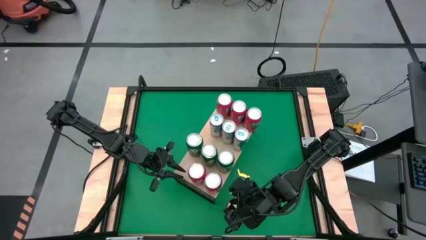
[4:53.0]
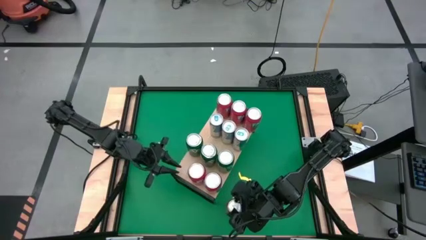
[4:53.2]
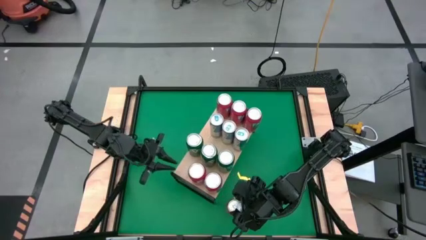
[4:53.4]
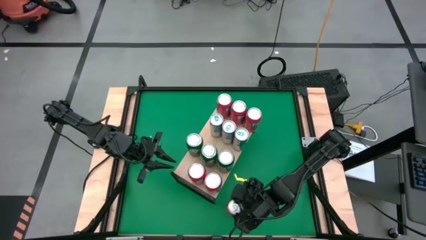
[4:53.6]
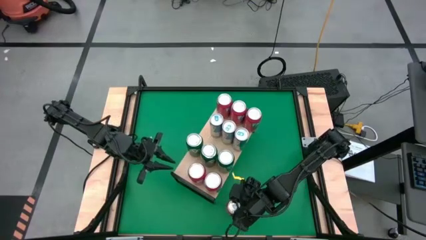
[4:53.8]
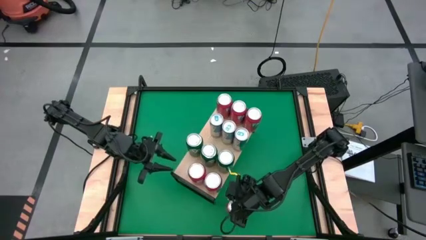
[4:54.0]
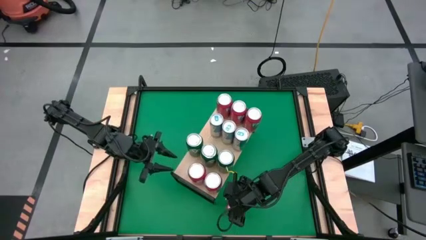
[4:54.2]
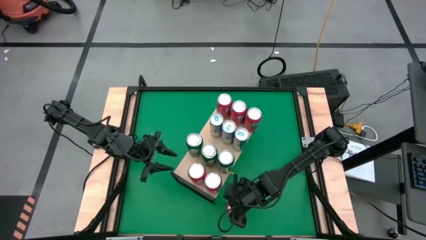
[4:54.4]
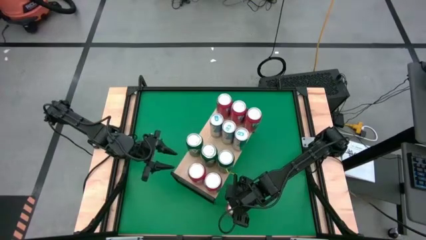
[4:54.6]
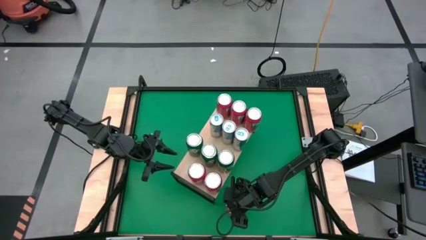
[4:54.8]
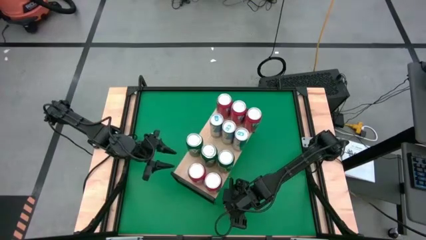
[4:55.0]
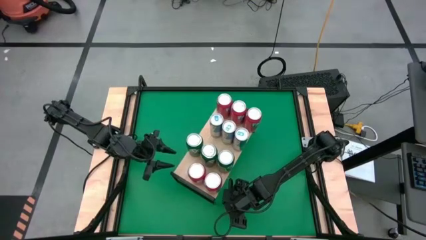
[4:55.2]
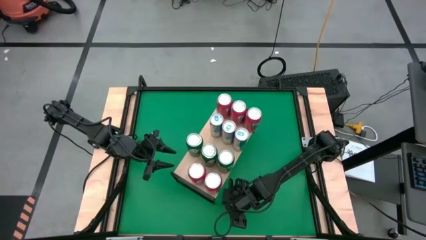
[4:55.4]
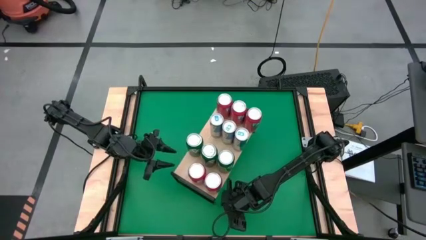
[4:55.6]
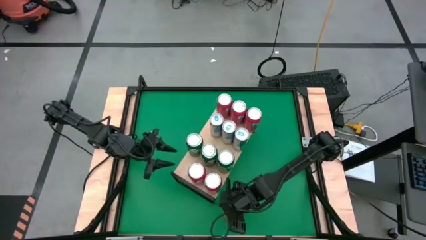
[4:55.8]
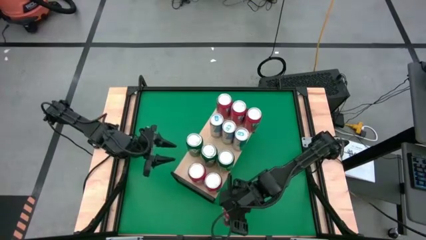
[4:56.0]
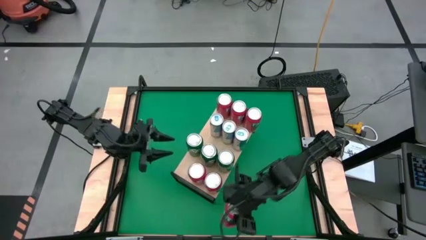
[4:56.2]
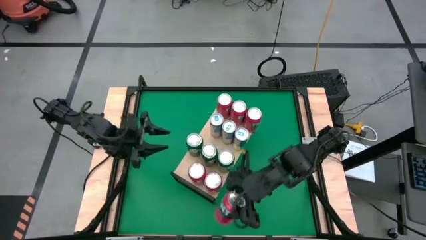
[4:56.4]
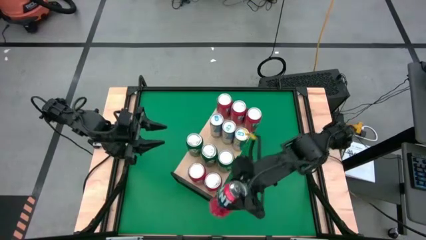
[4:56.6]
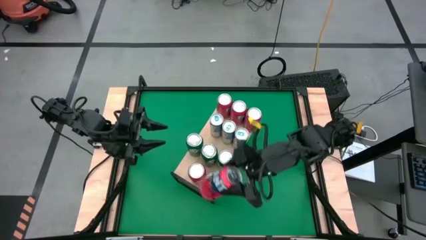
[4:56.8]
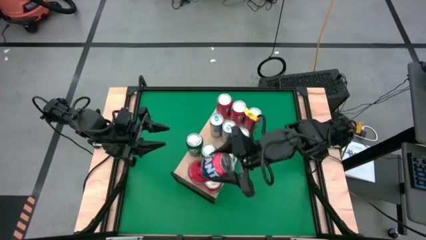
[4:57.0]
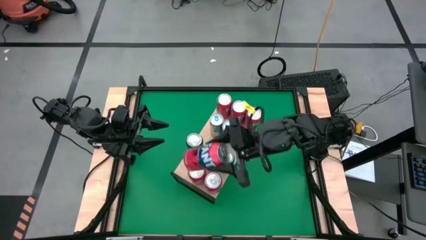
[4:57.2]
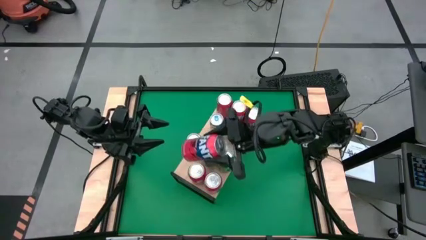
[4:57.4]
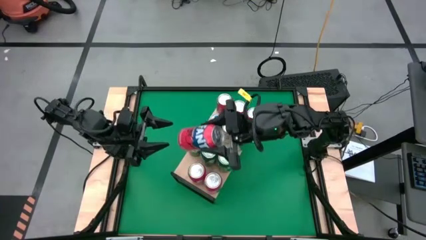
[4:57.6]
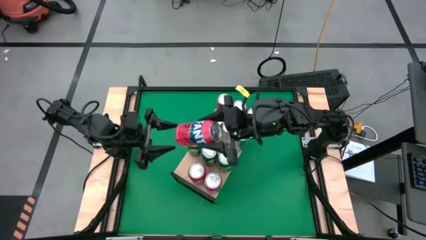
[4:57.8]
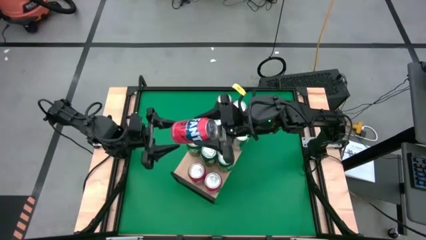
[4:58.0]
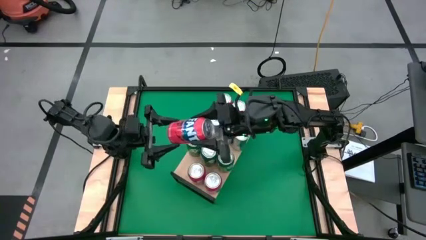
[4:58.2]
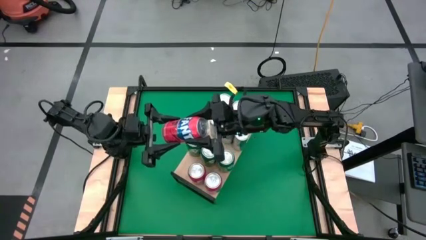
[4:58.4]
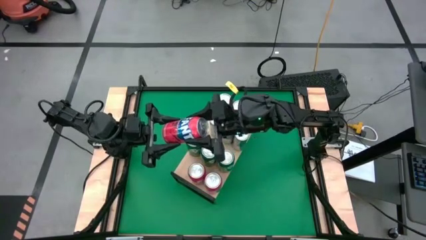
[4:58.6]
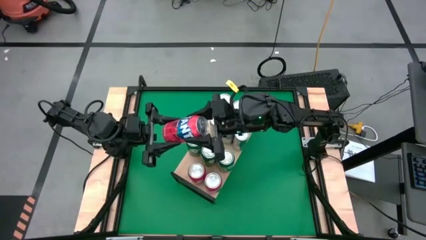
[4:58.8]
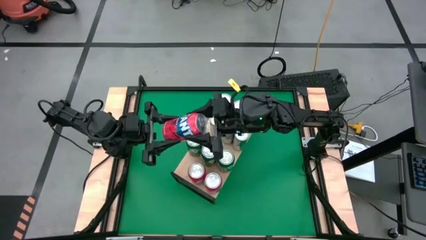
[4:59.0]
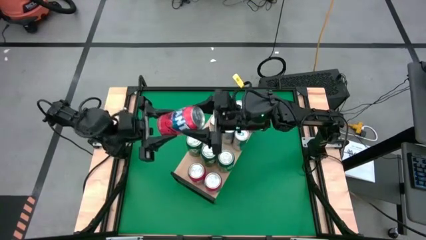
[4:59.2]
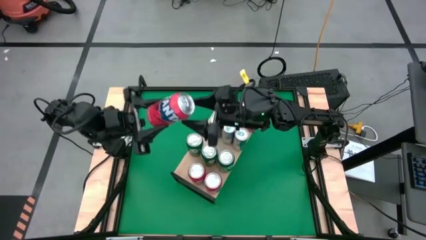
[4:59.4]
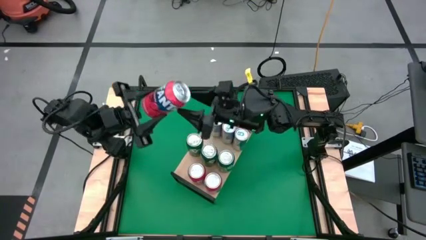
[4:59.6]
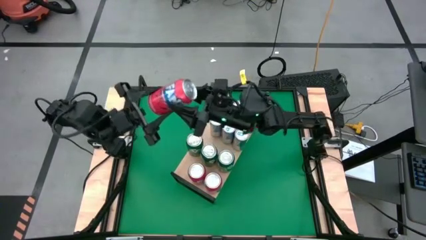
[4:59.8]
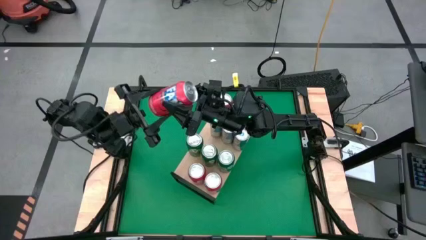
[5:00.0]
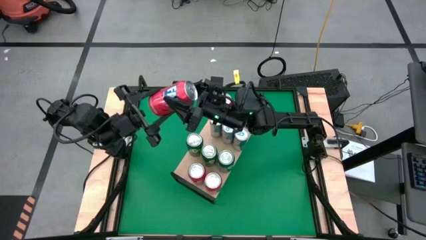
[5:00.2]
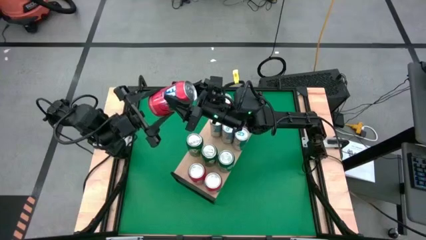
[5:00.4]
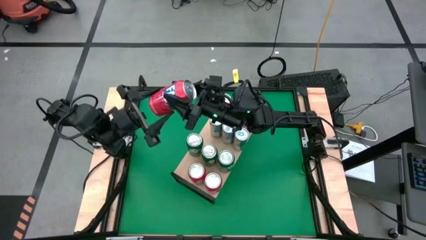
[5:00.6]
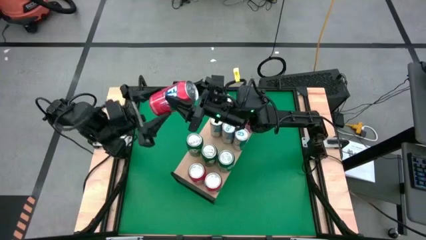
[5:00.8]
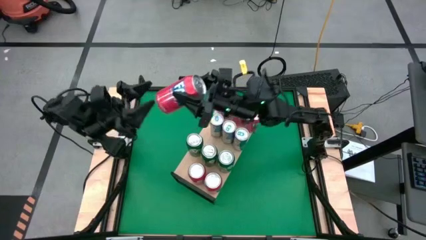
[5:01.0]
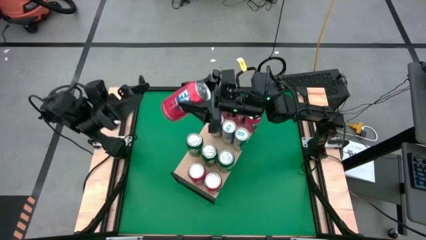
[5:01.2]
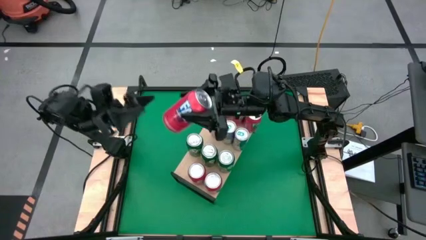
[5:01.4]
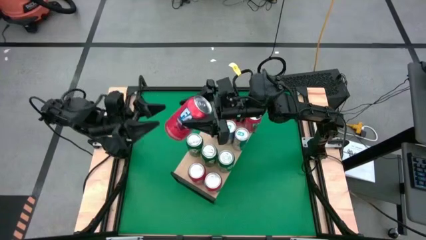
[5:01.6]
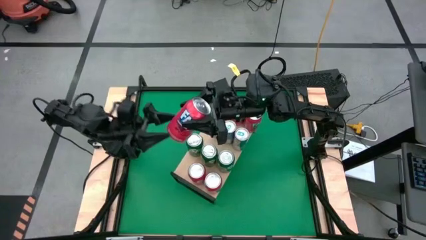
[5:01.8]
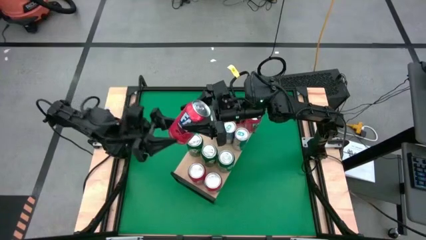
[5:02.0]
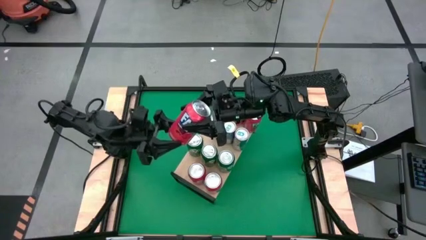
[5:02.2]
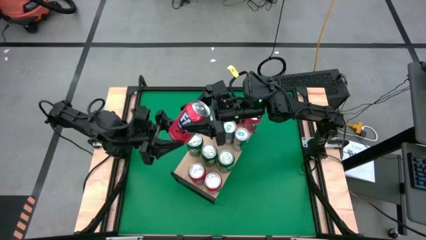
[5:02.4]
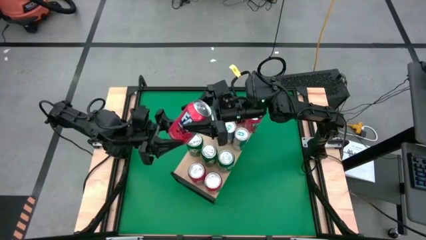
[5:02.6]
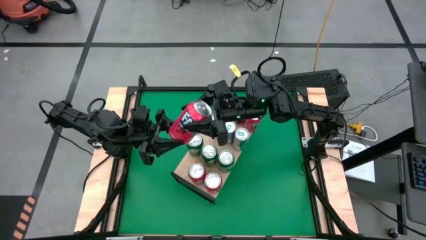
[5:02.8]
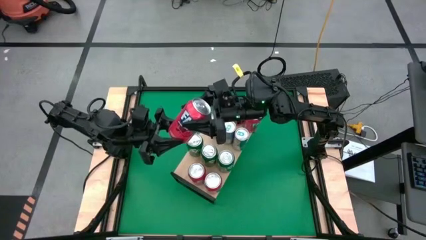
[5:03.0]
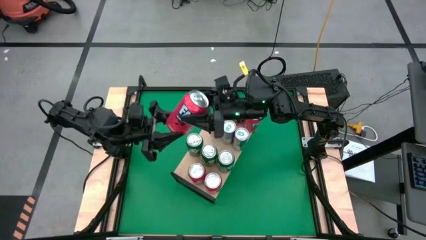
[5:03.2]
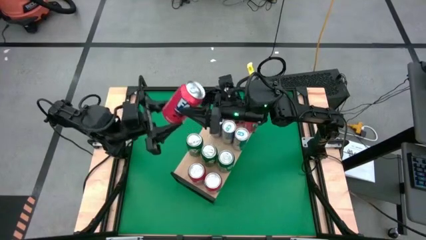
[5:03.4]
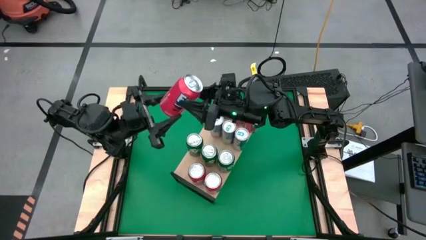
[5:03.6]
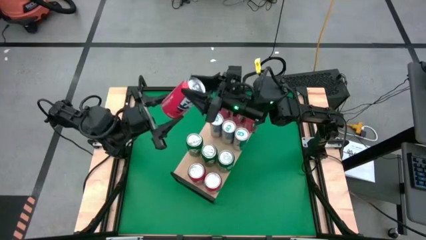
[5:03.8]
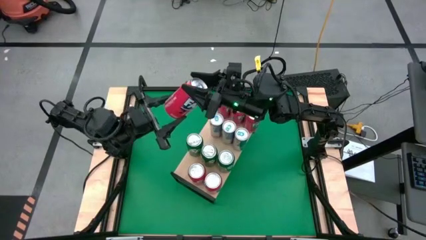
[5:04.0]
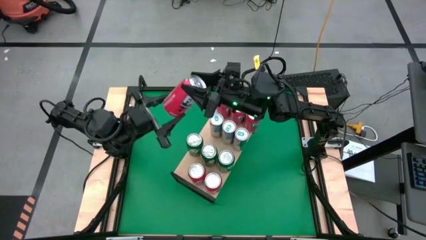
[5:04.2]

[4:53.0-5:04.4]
Task: Sort soda cans
Put the red soda can on the shelf and align it with the bottom red soda cans

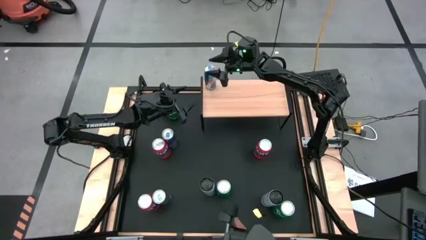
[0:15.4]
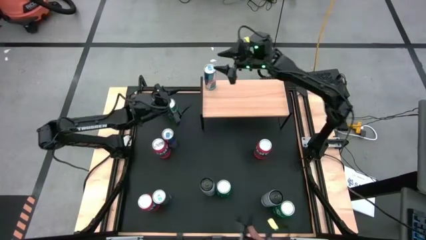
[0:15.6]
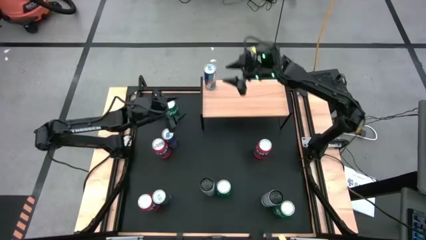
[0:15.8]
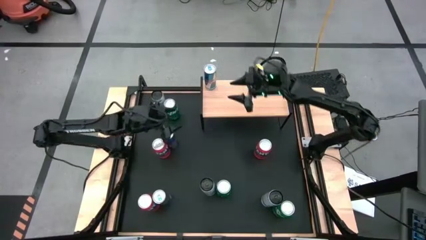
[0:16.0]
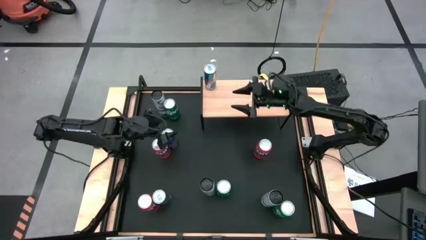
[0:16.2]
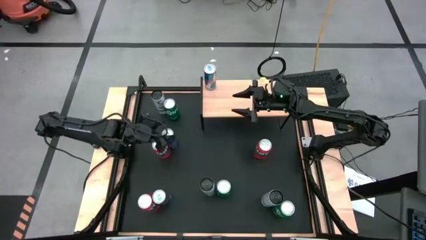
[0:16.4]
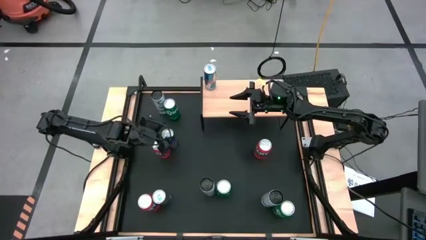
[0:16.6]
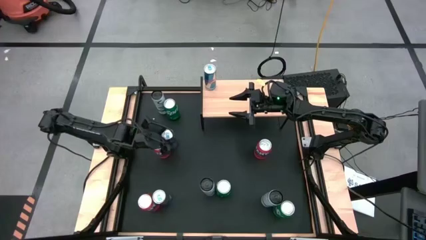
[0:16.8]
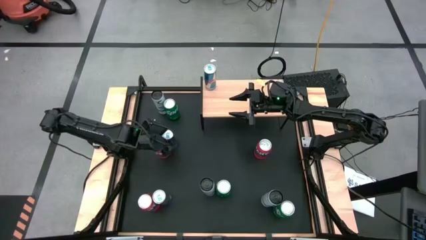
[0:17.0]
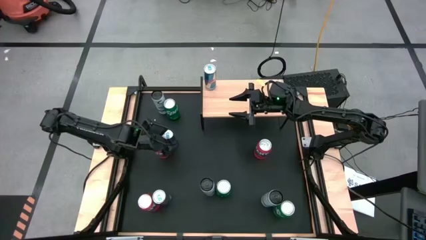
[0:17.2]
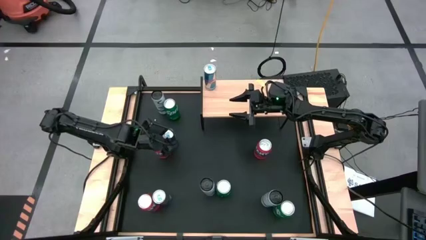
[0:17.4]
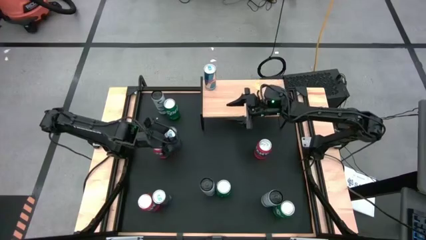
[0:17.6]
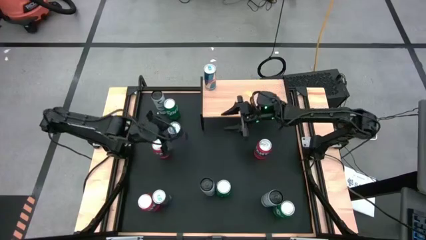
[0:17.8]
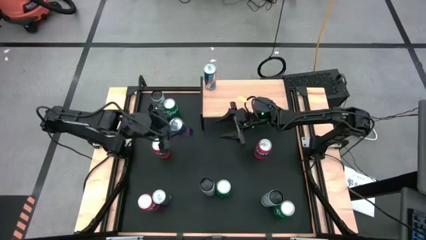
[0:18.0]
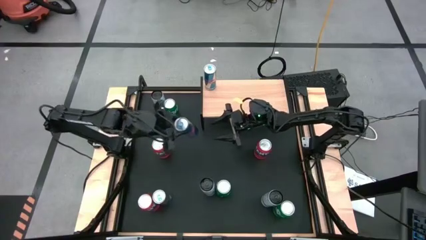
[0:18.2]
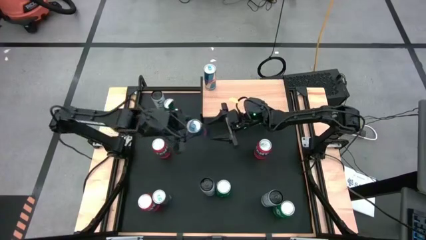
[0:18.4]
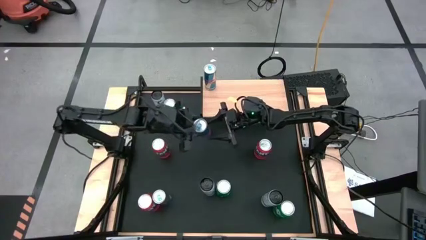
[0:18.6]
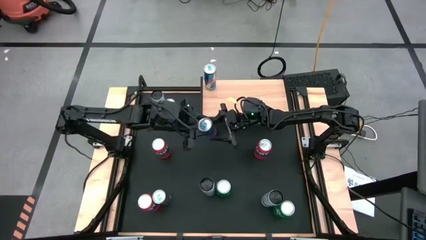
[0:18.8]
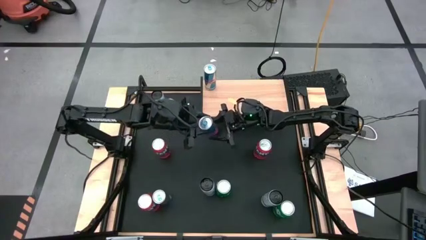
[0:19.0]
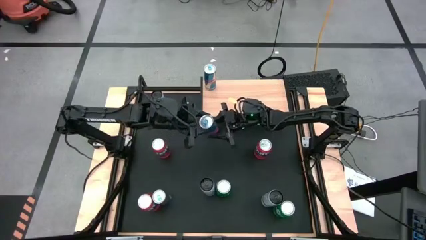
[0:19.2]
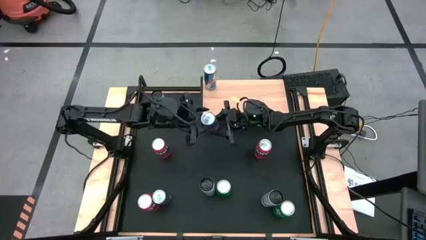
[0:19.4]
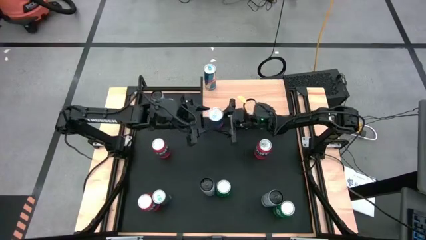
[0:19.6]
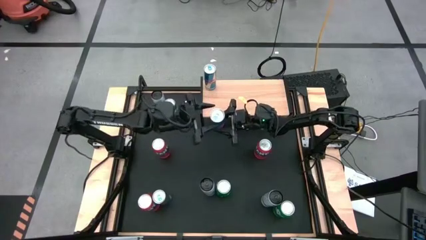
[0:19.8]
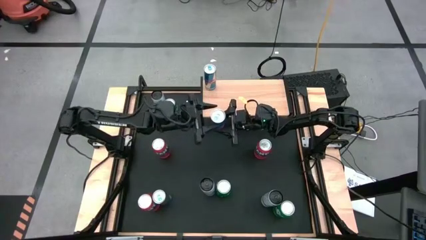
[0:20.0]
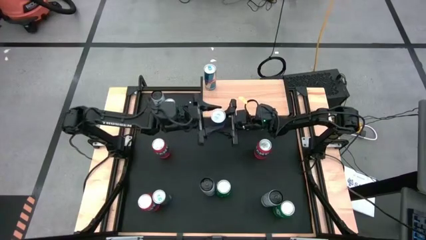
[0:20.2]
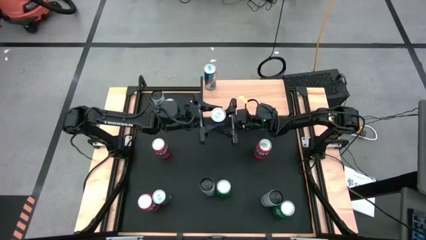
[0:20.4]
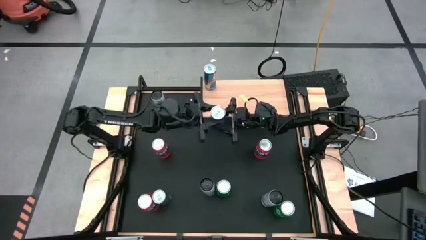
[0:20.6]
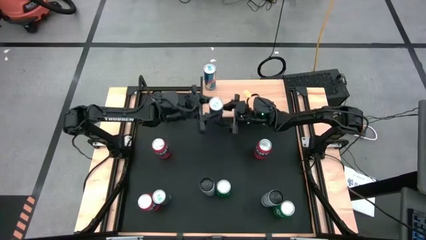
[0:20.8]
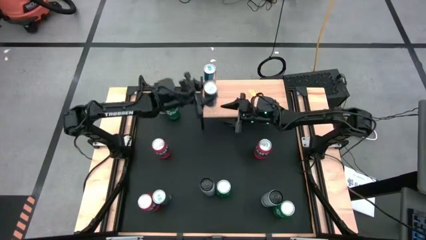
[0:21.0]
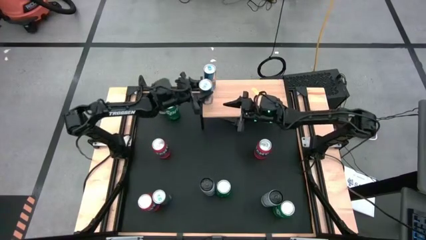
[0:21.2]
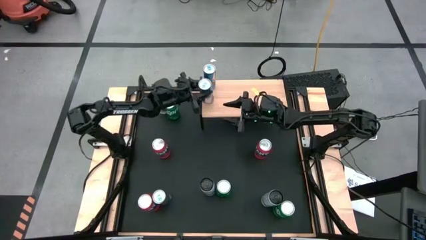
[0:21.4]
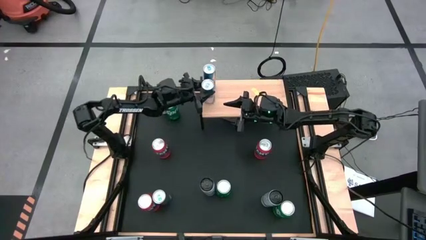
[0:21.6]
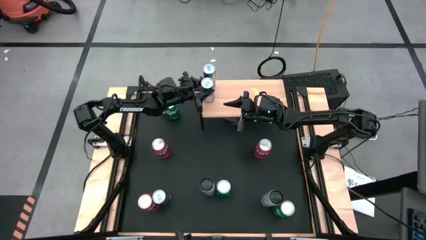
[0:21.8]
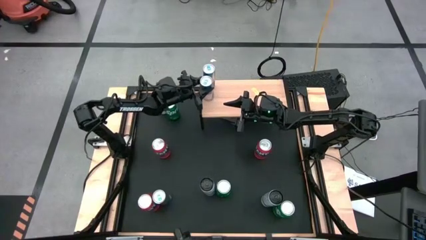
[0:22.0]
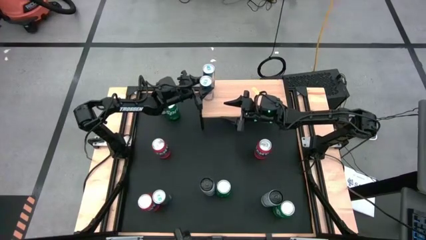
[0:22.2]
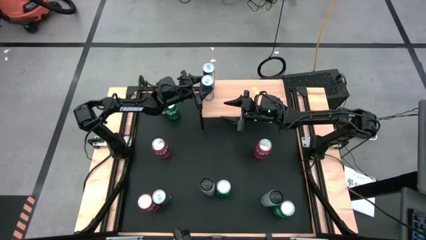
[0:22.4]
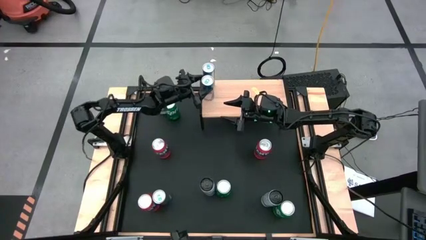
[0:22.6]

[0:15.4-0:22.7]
Task: Place canned beverage on shelf
Put the top blue soda can on the shelf aligned with the other blue soda can
